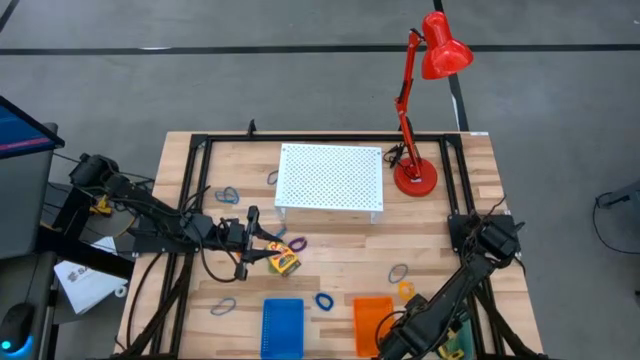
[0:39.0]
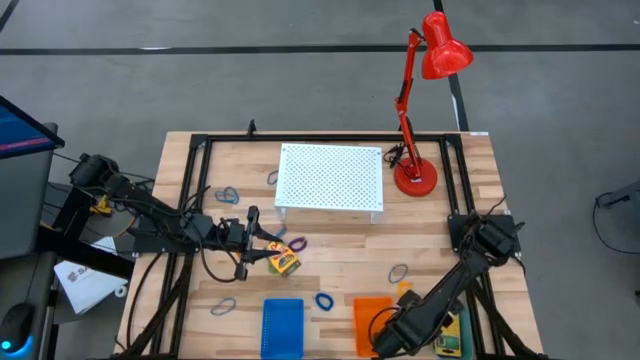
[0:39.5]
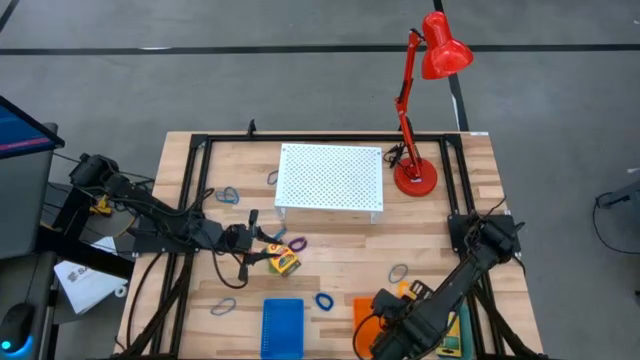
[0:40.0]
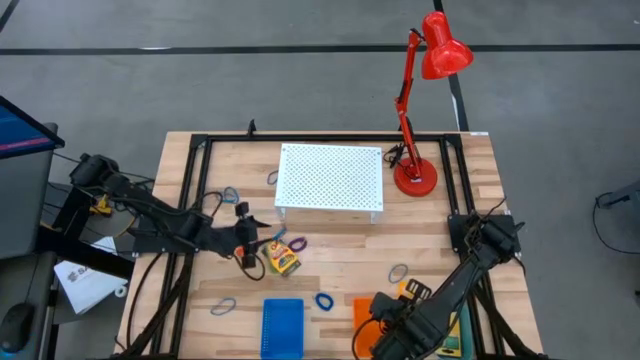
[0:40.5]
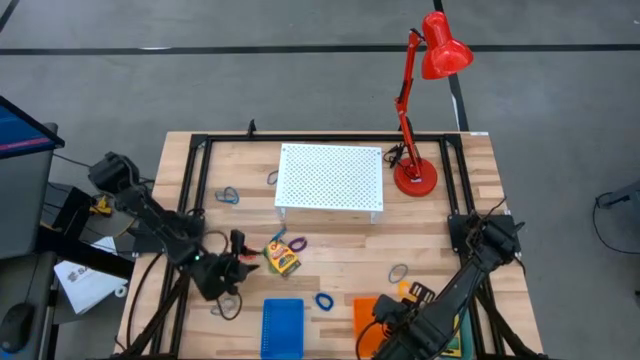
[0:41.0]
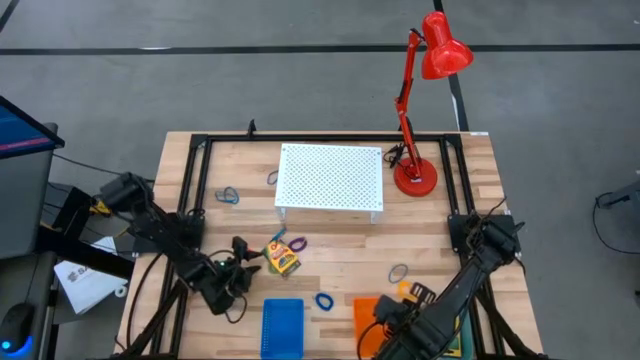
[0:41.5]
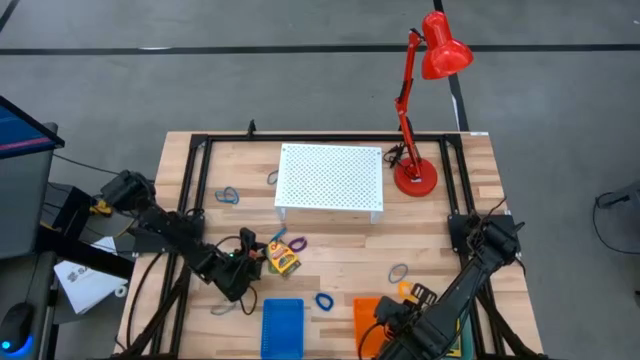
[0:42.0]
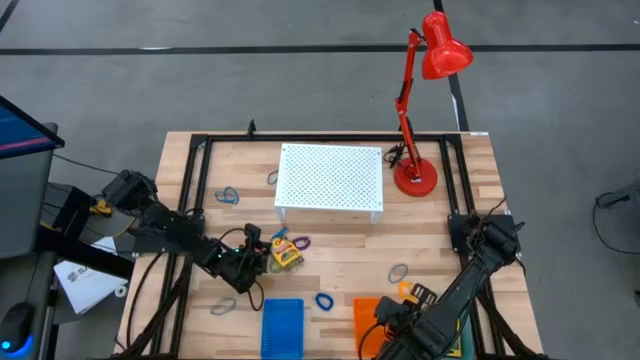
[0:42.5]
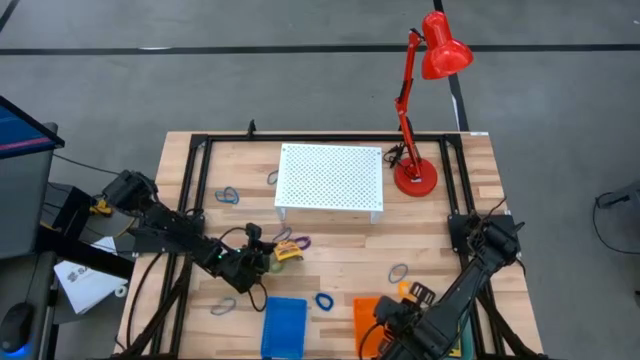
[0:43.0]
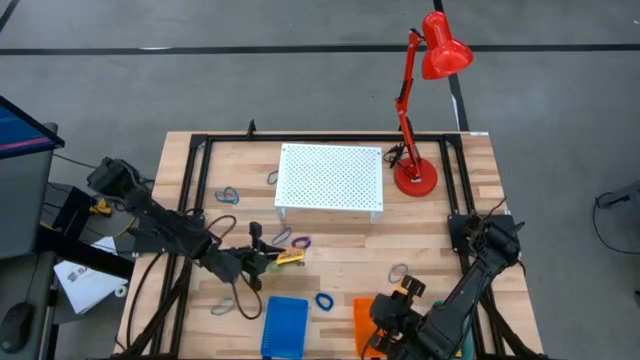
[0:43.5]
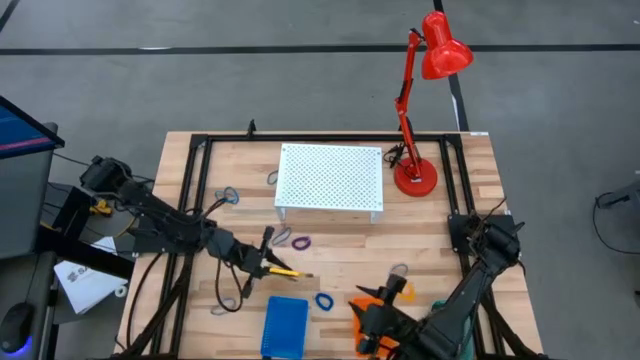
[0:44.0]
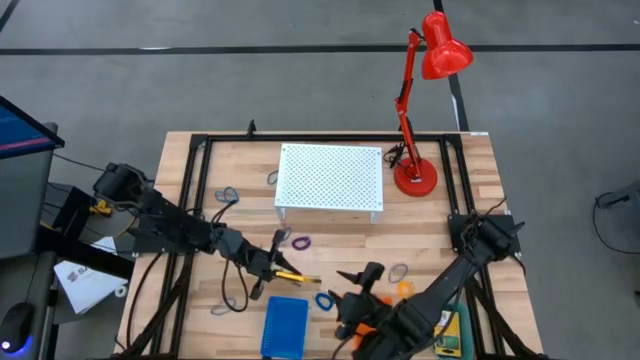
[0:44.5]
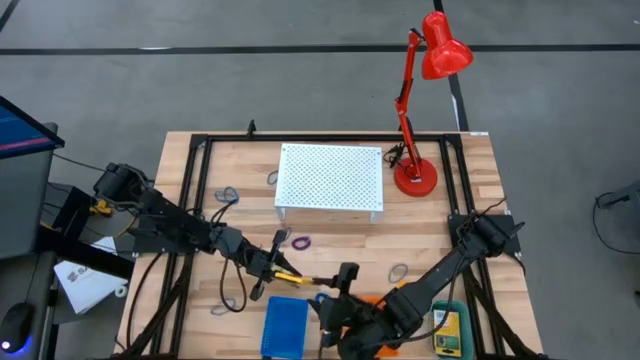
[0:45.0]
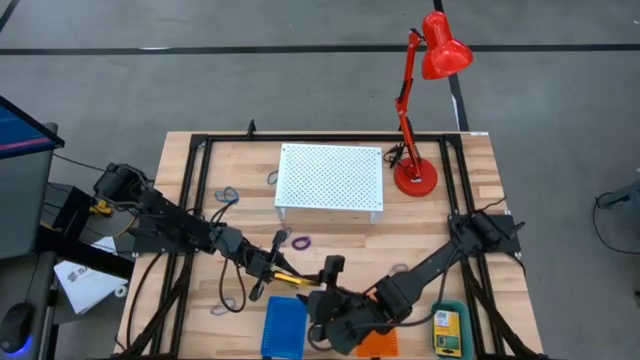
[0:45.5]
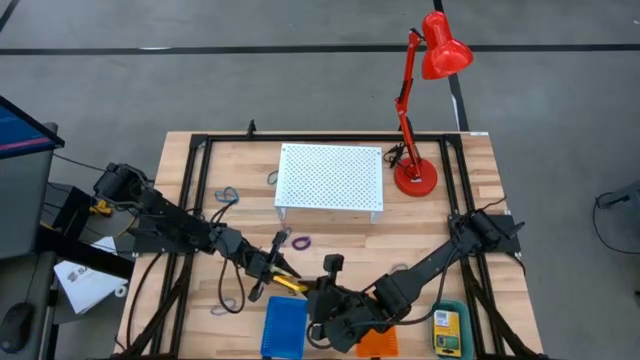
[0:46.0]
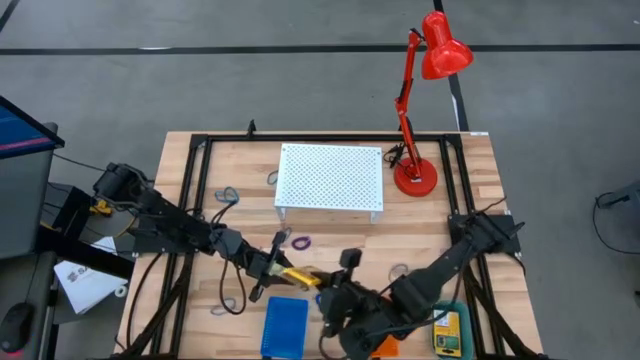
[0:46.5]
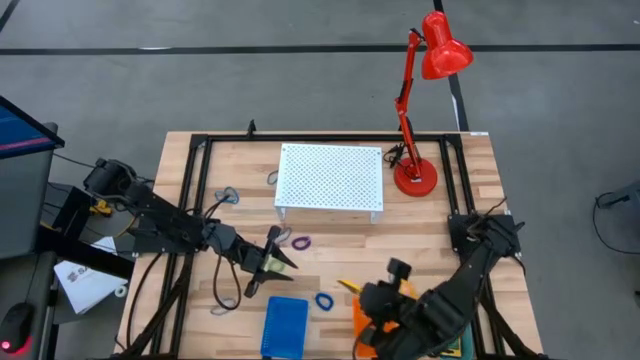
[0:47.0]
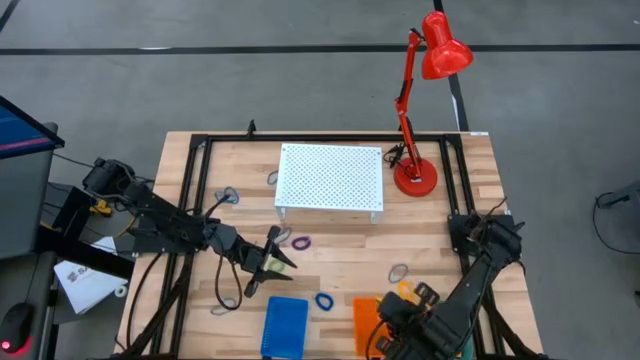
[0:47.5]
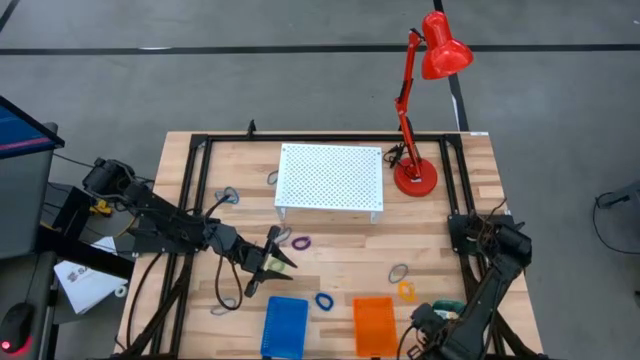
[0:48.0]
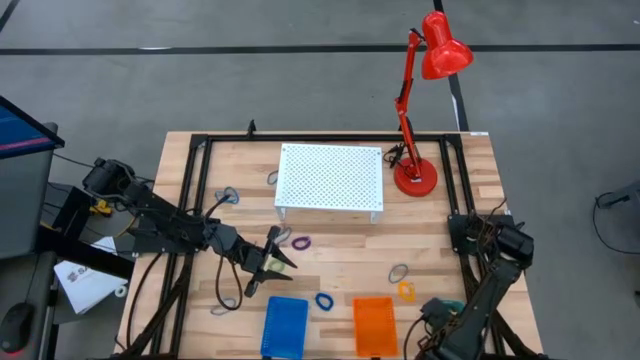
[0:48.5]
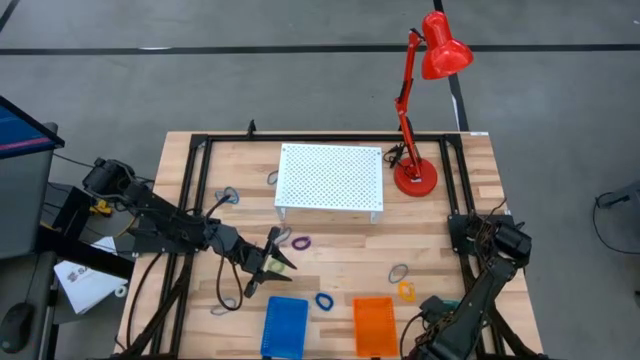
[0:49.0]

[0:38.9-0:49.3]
Task: Pick & Place Office Desk Supplies
Put the yellow crayon box into the green bin

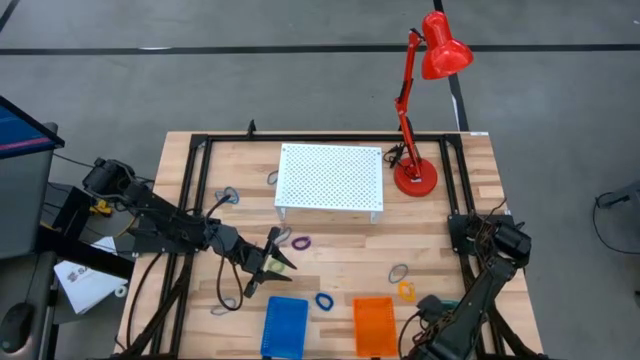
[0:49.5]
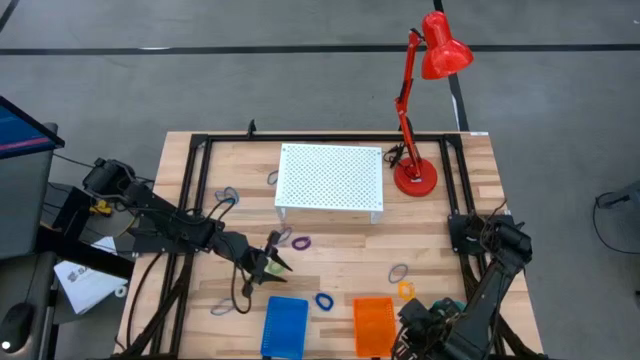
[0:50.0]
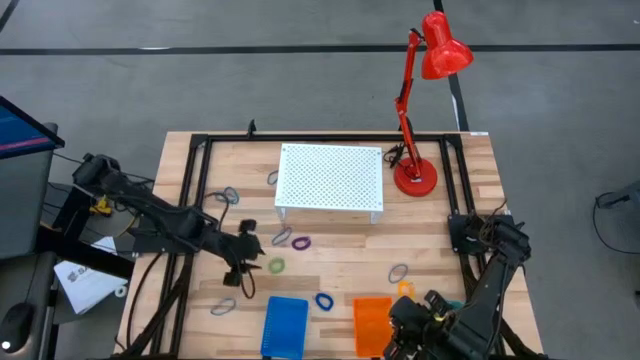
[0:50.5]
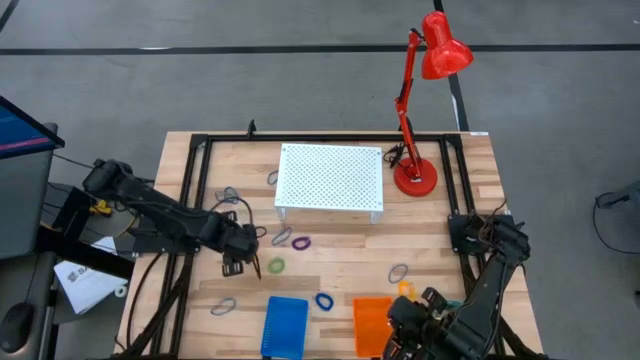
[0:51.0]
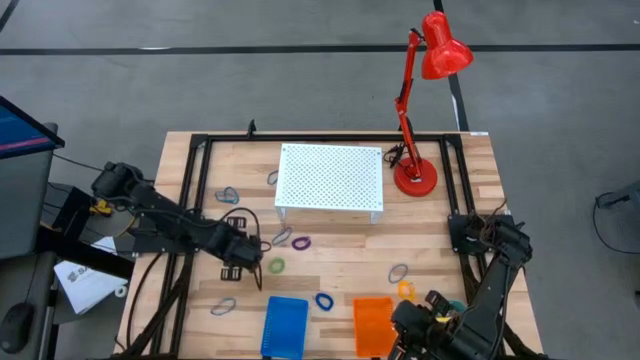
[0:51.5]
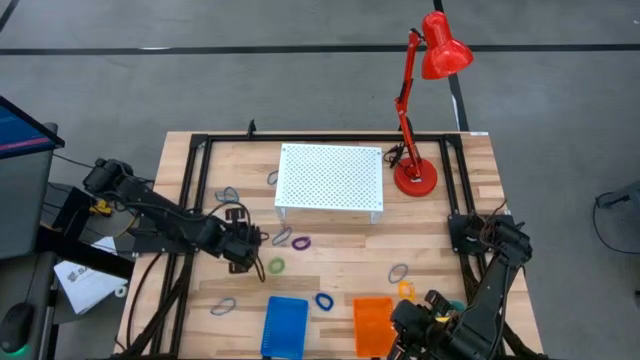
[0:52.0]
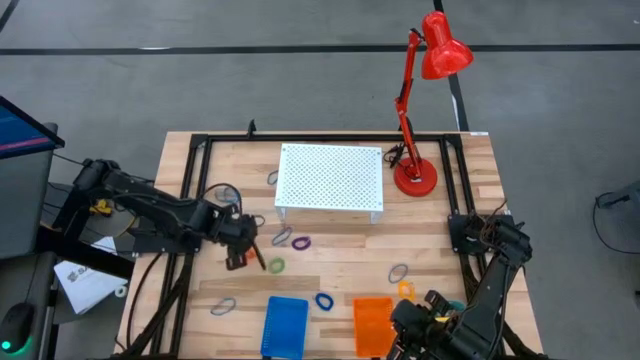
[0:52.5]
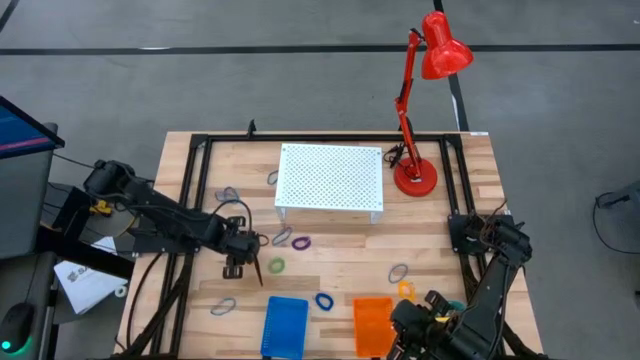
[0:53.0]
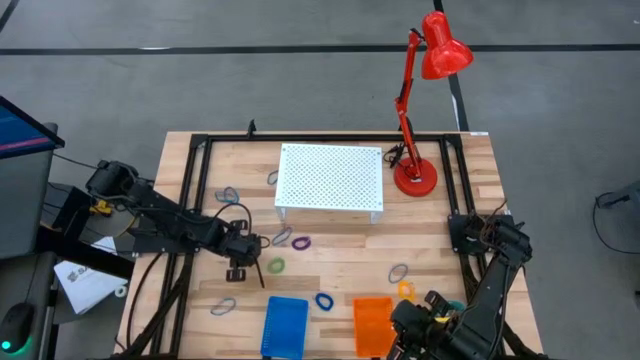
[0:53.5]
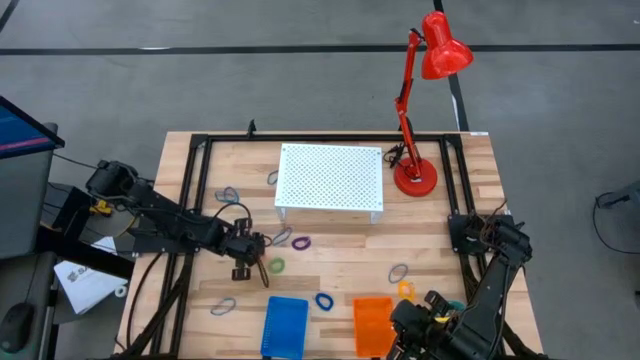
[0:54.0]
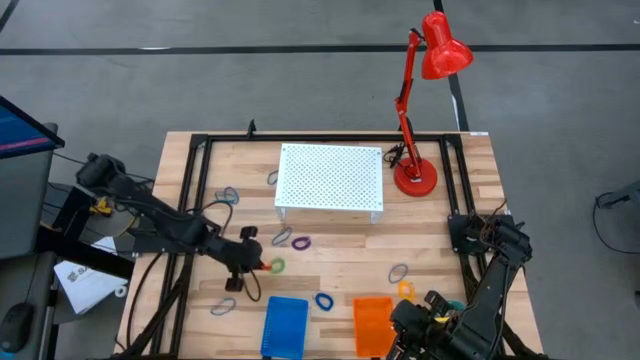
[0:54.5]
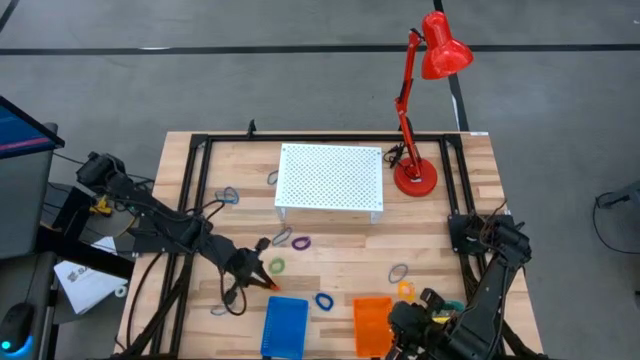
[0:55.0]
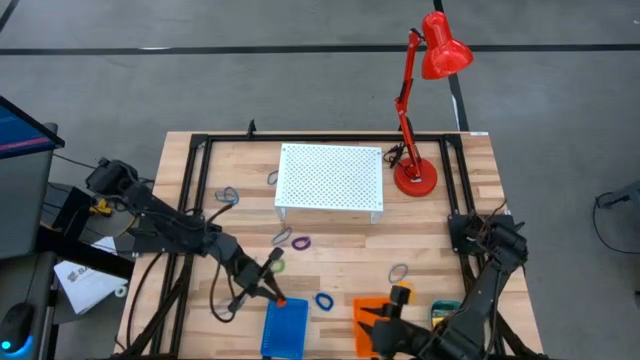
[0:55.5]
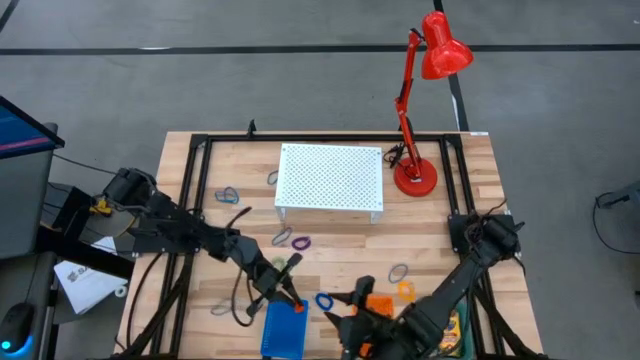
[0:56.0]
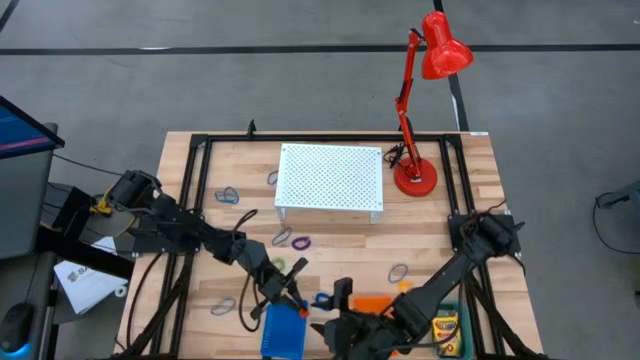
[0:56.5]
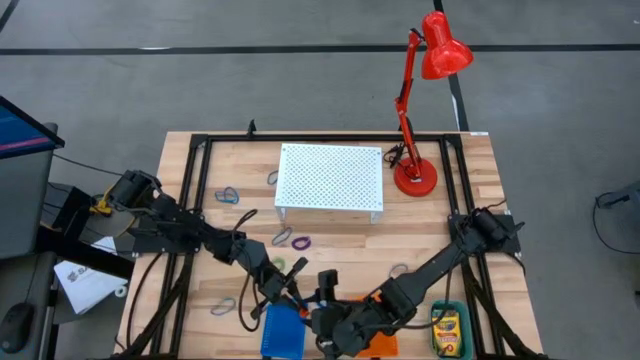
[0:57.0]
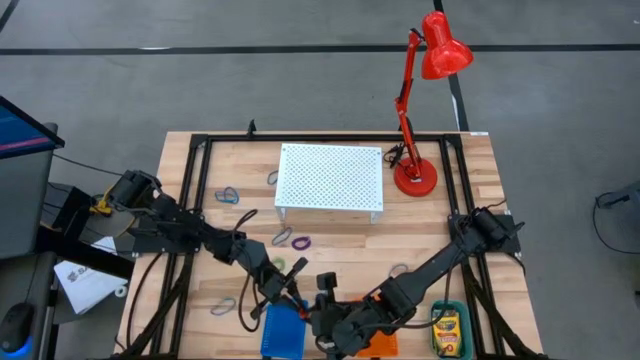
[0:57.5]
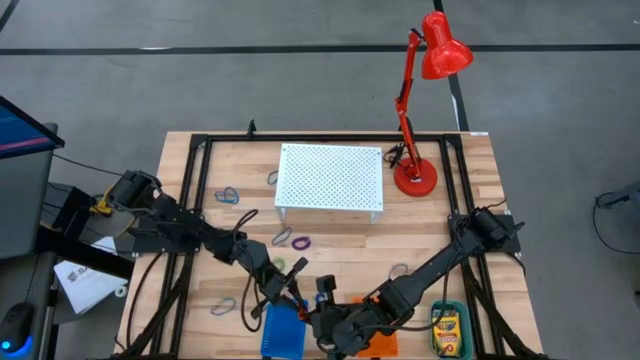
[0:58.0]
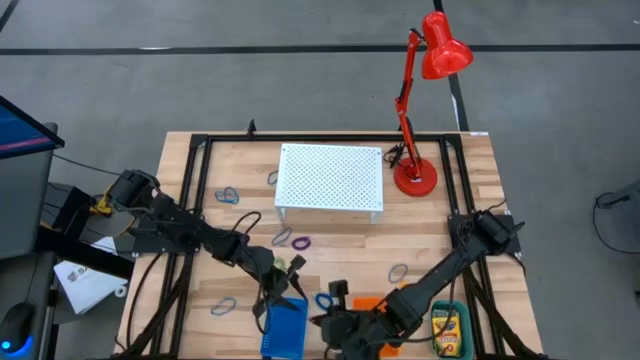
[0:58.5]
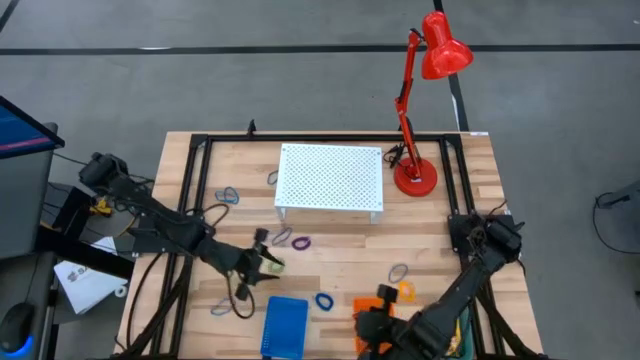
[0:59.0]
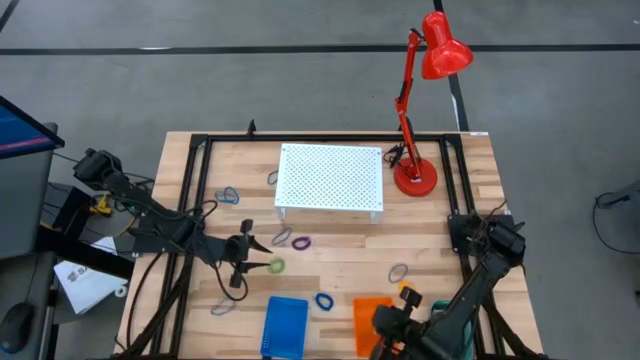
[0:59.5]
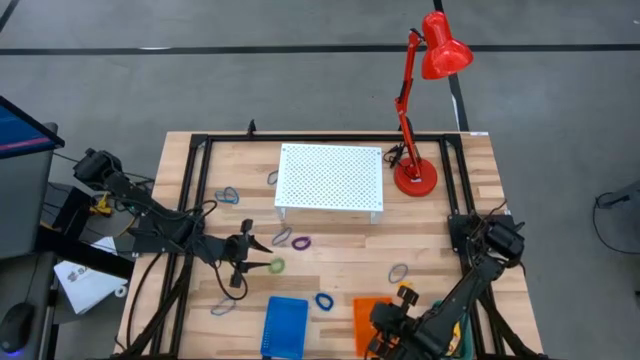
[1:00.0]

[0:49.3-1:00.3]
Put the orange spring keychain into the orange bin
